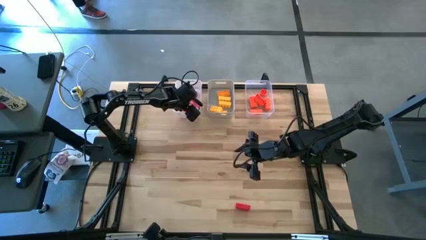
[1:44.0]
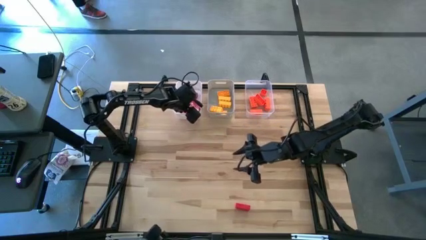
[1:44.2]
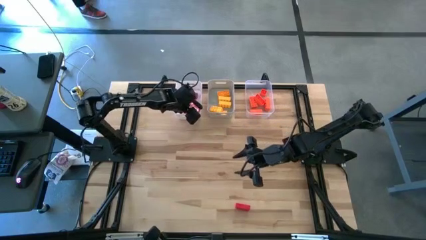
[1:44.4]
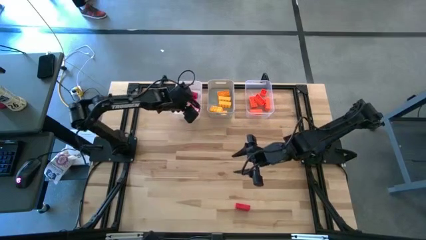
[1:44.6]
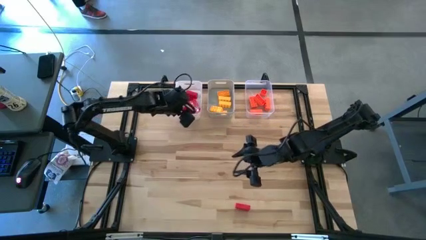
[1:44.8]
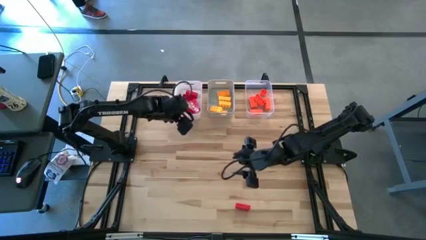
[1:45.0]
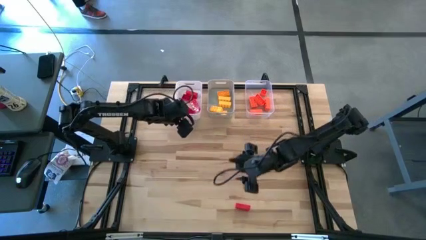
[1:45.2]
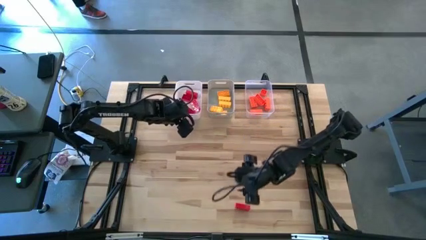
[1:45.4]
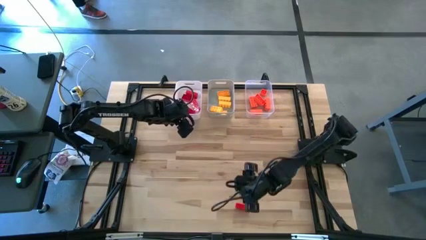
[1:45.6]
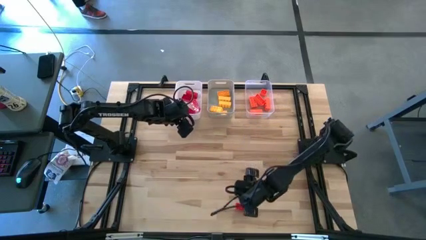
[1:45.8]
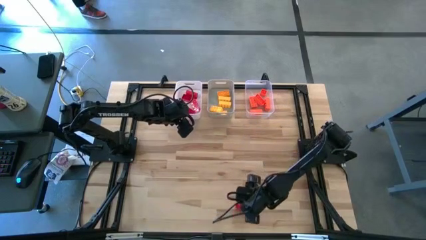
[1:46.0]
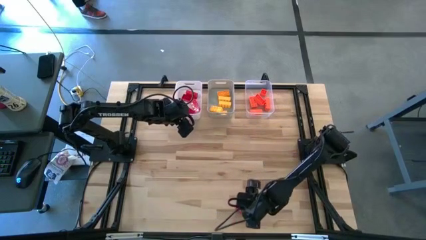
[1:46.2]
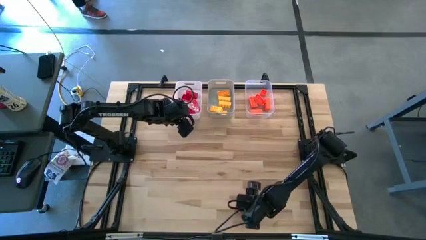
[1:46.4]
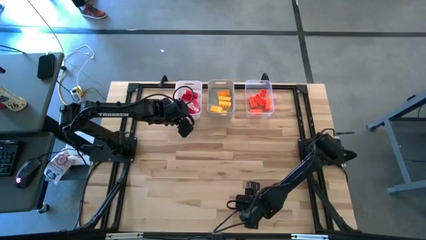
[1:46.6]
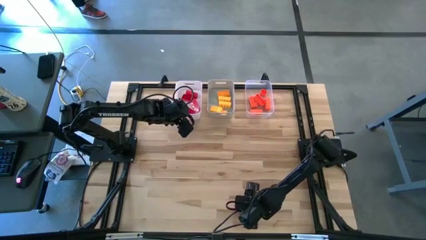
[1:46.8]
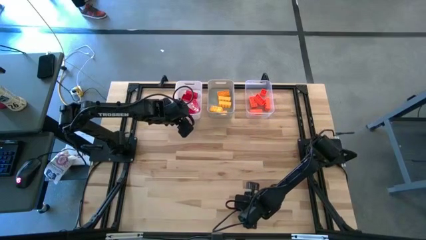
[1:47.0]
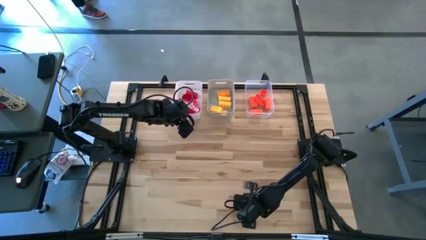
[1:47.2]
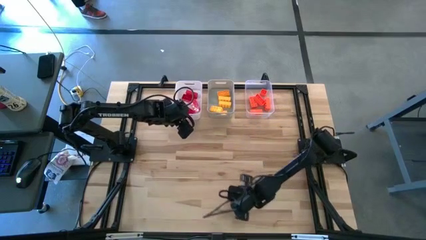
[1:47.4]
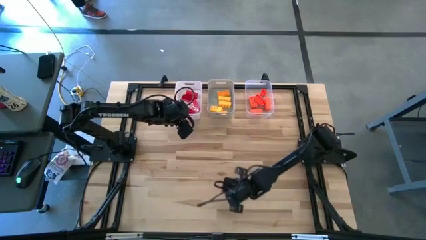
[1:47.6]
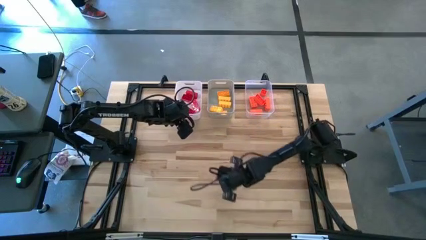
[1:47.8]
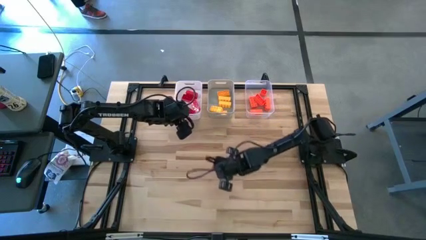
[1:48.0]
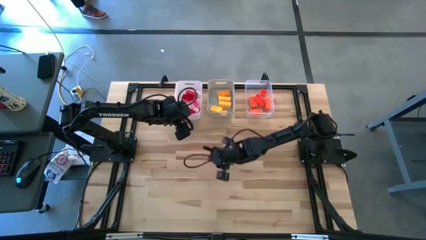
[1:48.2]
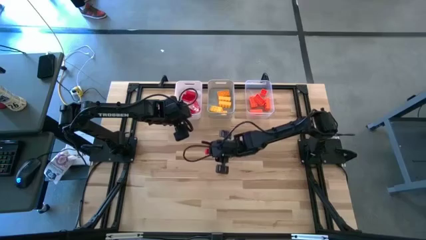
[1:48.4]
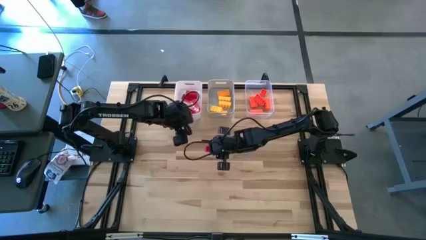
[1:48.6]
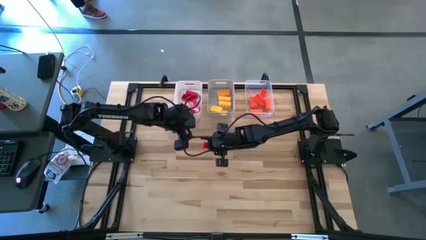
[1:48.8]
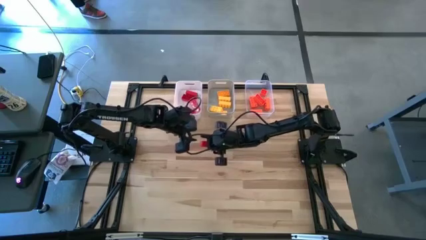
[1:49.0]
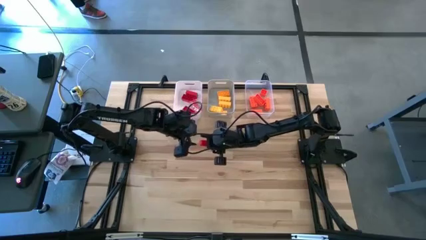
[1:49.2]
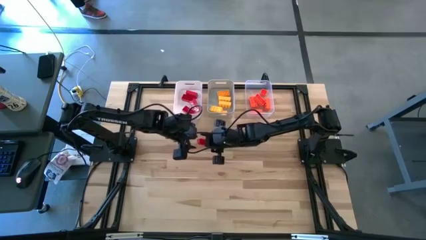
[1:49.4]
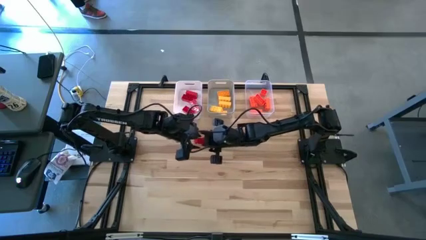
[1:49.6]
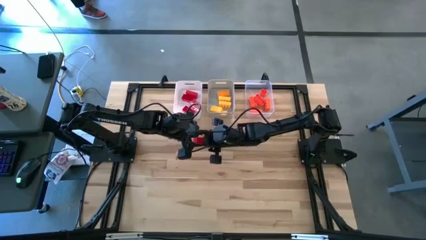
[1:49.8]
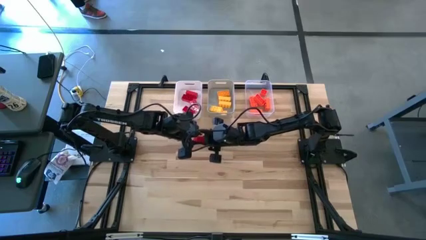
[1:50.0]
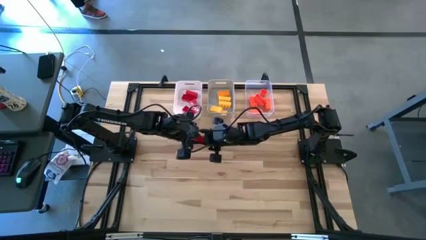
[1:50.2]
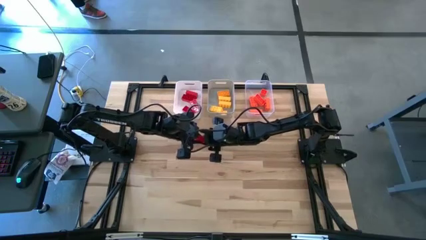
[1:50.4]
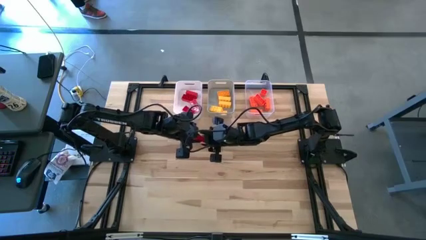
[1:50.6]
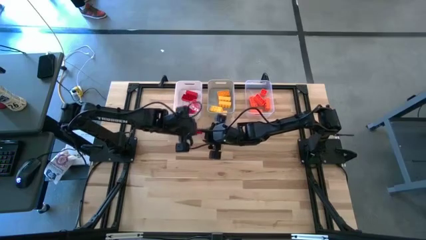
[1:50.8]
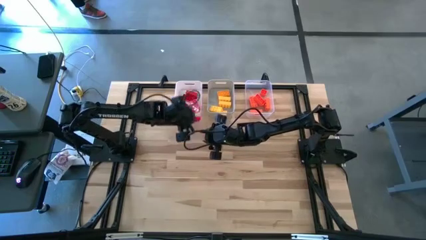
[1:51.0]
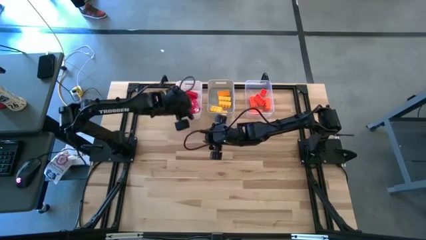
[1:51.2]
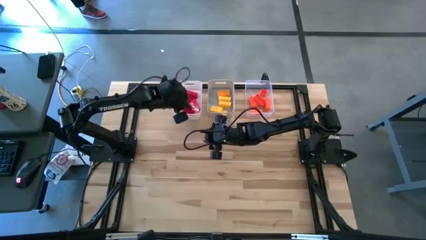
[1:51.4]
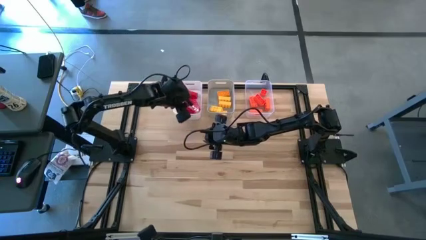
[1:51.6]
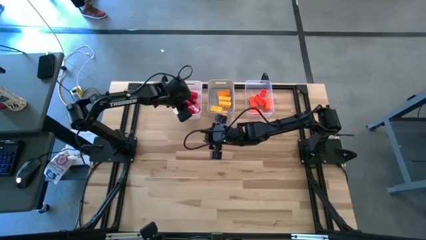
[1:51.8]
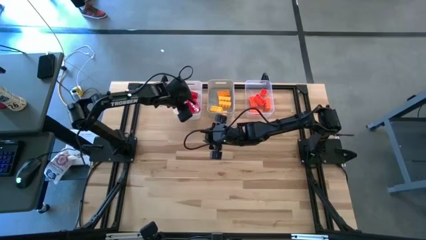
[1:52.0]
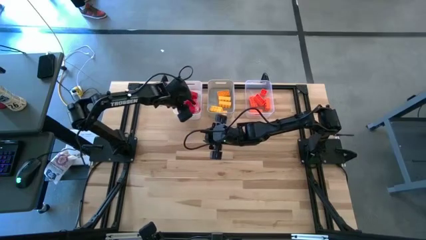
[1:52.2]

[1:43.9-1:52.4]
Task: Sort & place blocks by color
Put the red game piece into the white bin

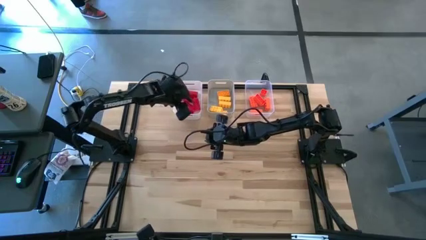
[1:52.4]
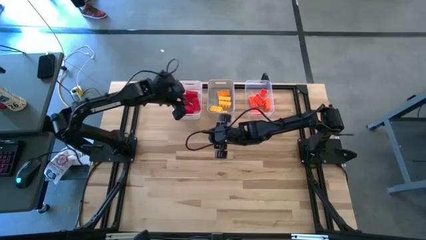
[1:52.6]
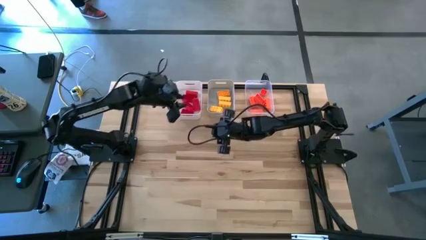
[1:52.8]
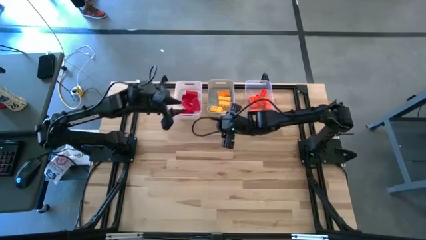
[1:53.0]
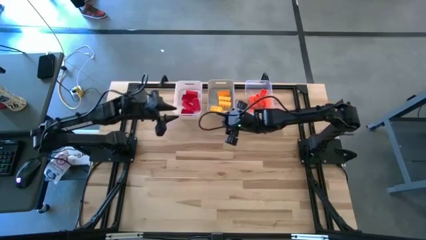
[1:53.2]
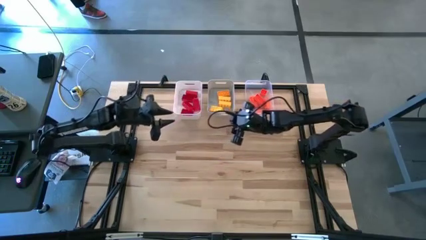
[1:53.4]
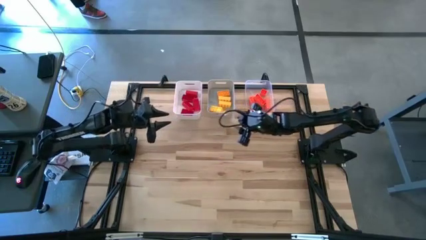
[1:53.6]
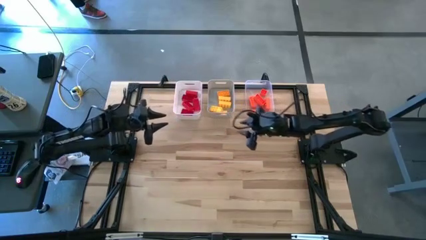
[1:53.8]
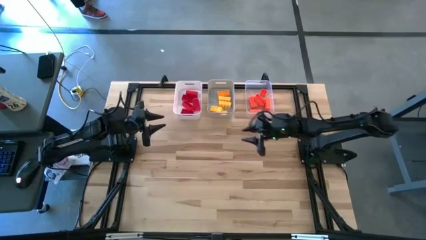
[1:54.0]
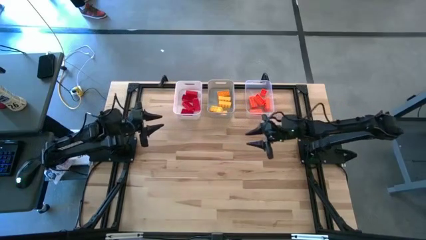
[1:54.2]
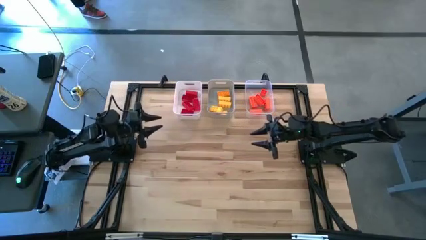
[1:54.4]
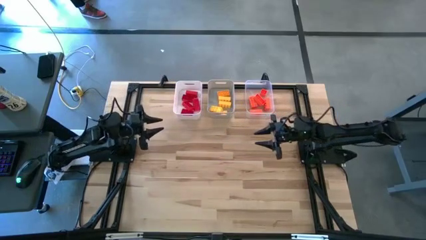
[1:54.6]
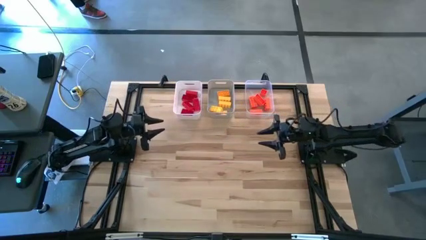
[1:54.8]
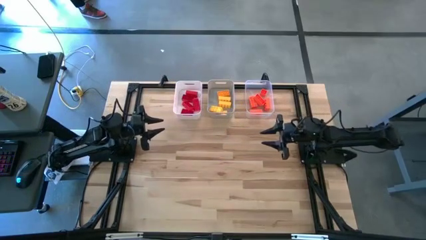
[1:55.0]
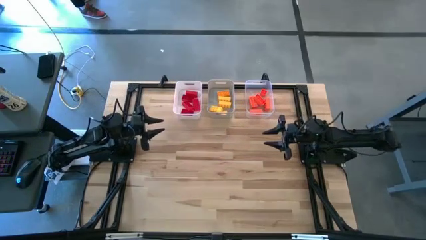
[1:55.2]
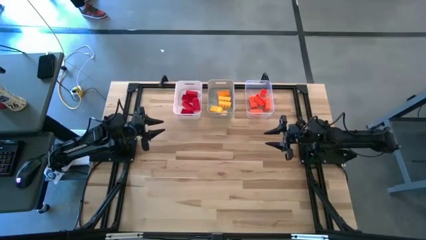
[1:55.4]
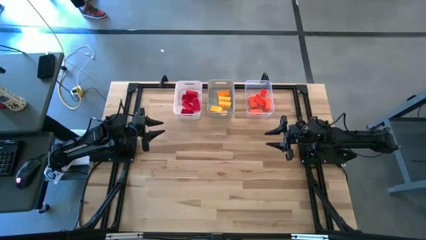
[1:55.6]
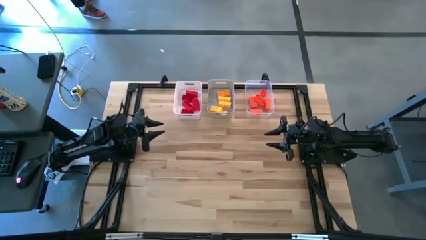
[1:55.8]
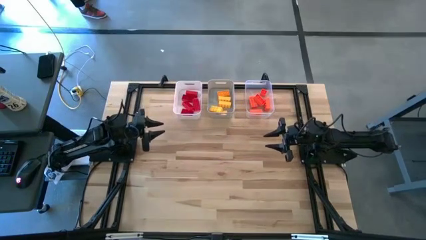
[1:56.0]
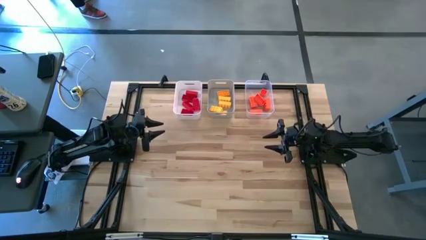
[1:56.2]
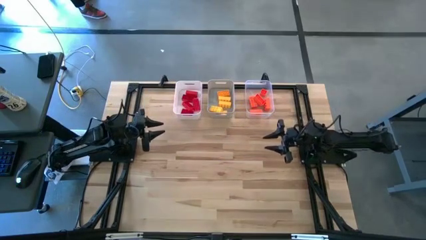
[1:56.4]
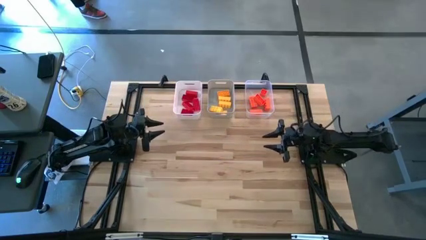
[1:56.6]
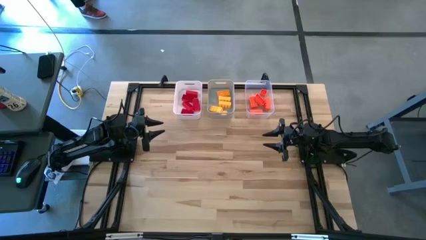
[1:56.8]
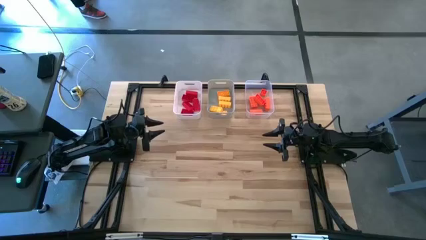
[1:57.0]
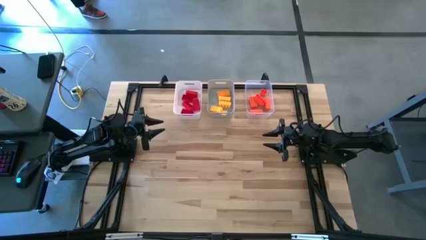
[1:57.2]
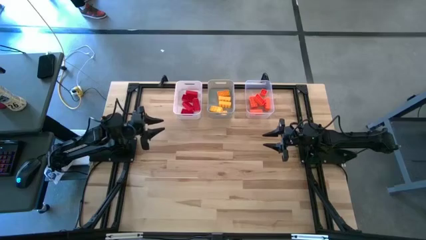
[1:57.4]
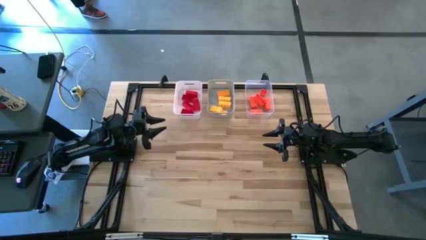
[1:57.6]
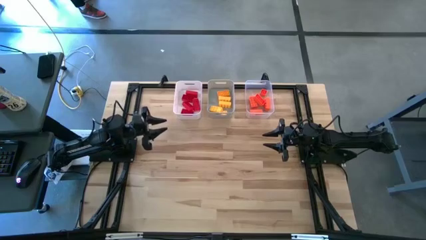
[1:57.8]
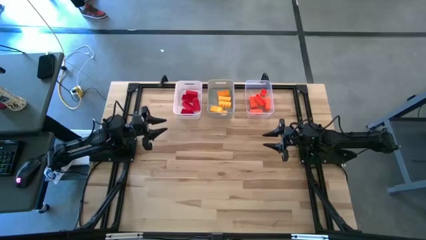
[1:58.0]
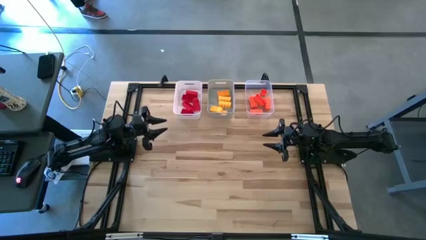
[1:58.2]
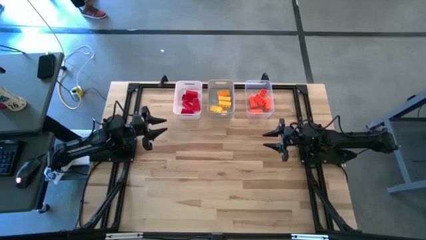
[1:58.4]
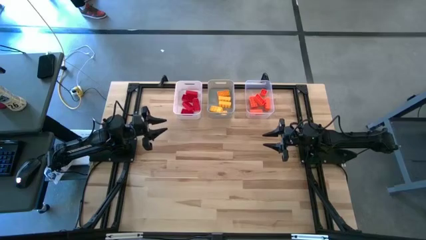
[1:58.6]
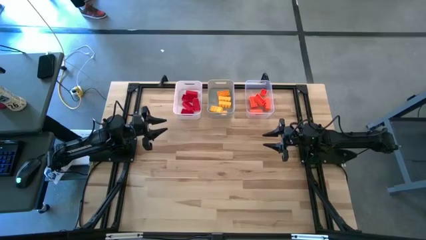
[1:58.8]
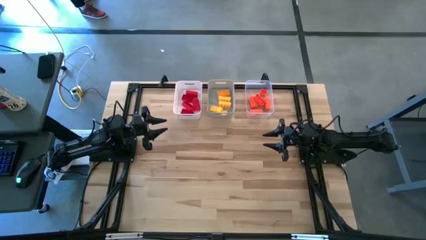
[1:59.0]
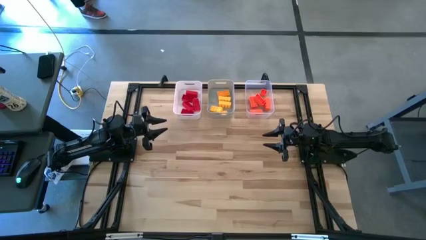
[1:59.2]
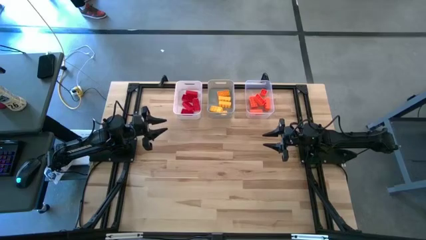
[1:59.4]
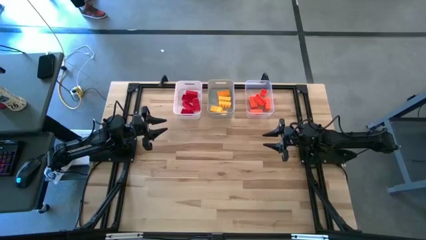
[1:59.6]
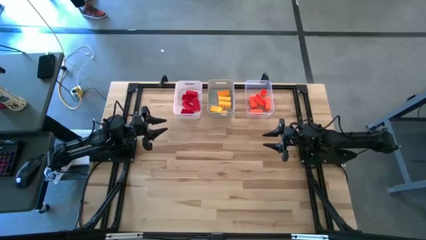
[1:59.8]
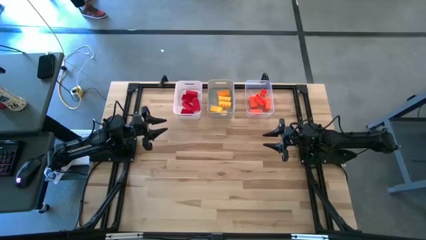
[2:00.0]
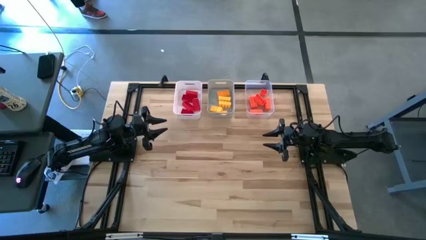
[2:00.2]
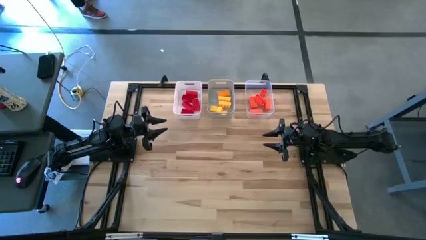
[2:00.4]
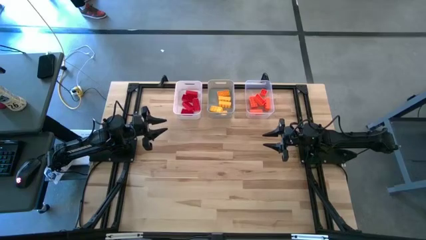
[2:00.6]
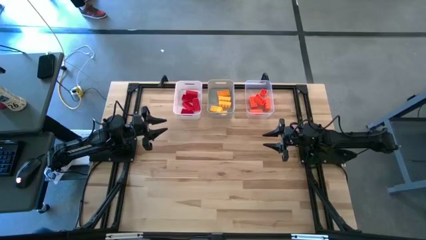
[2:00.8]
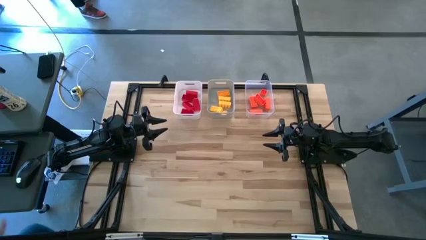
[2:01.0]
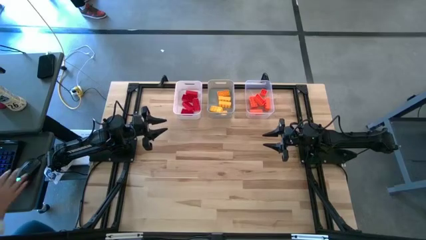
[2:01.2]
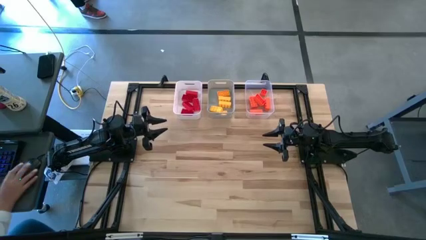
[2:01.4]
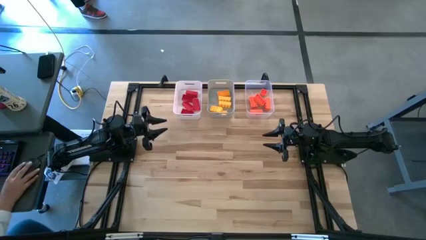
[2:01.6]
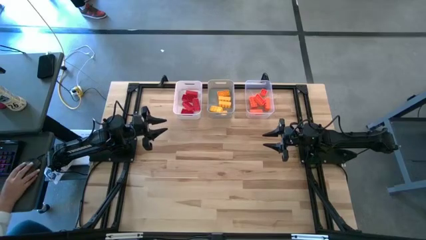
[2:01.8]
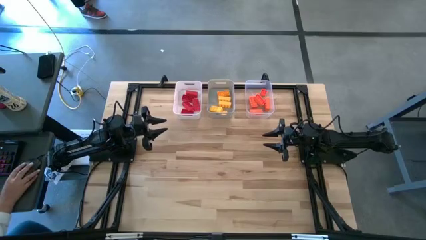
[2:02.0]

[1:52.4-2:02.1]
Return to Home Position
